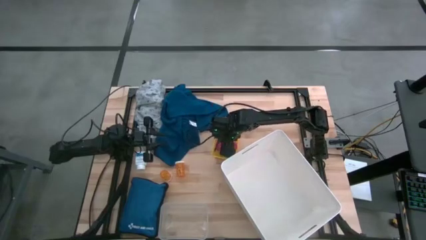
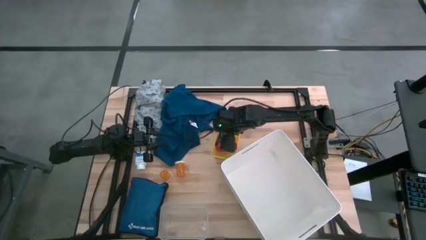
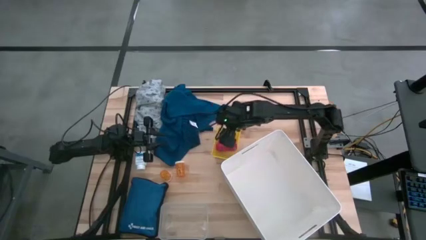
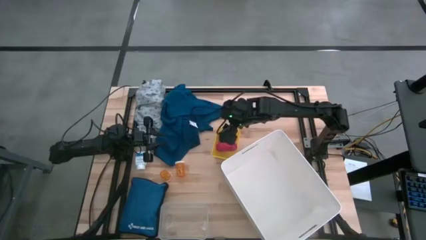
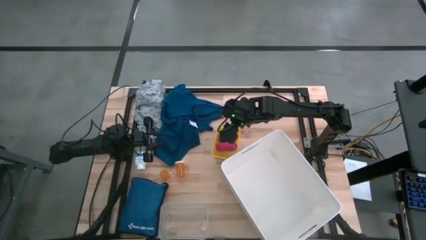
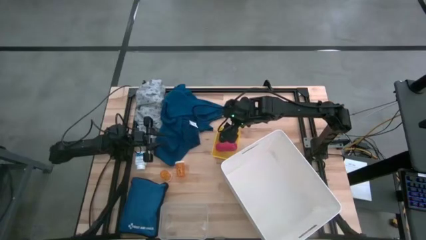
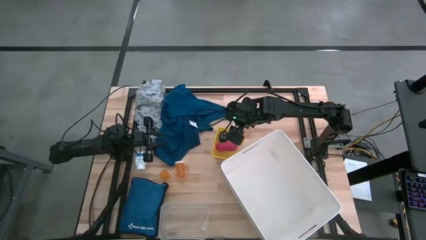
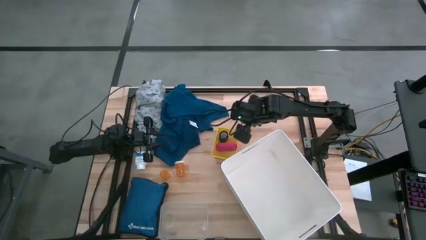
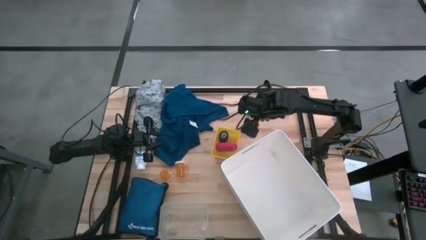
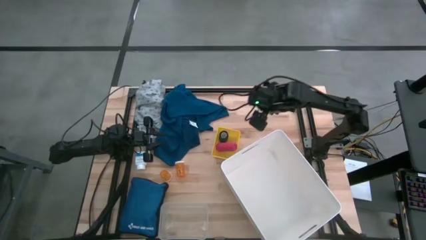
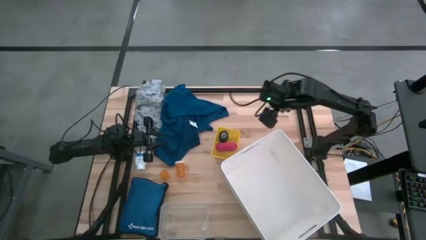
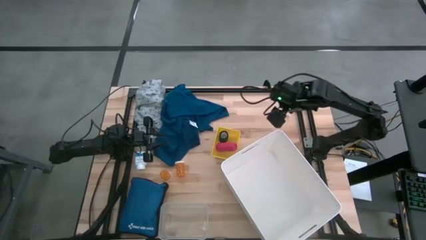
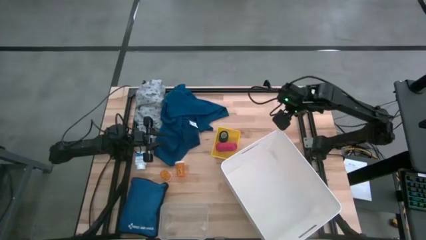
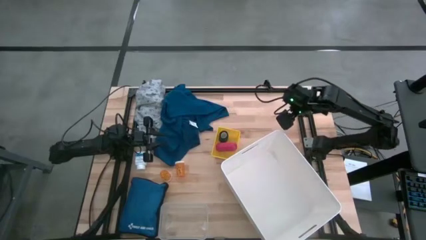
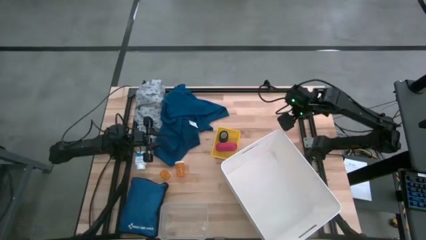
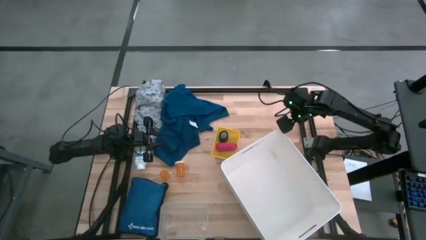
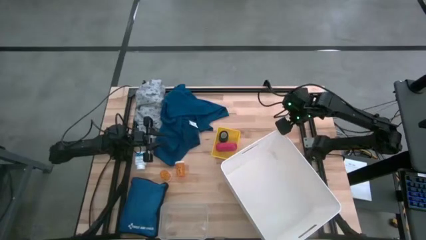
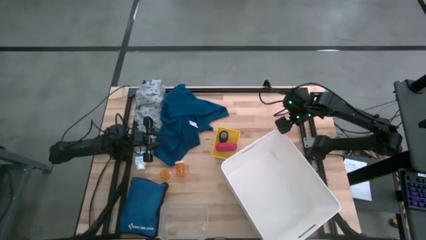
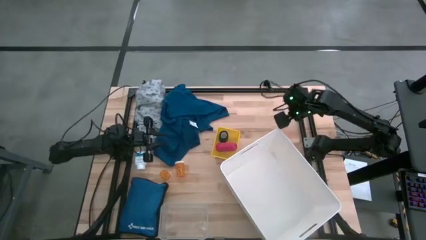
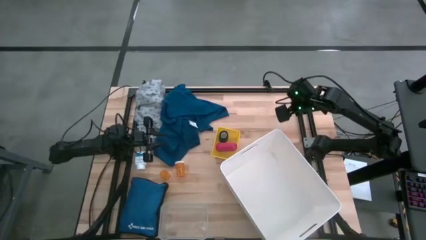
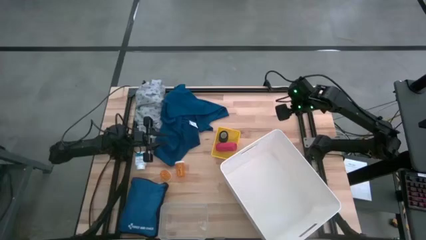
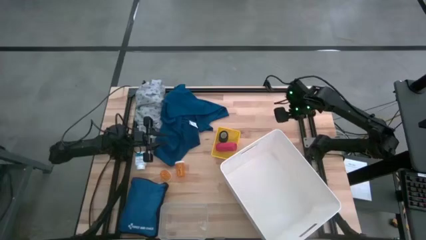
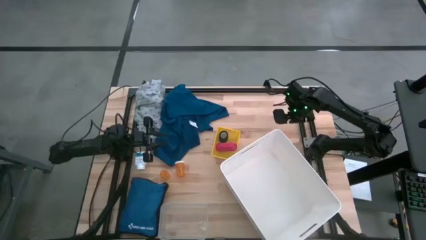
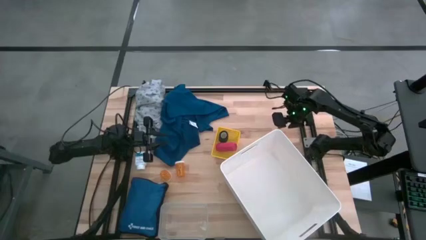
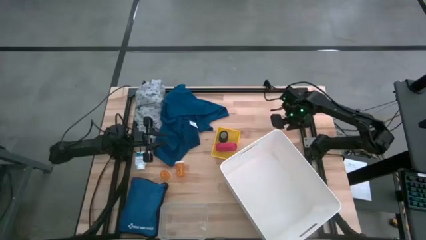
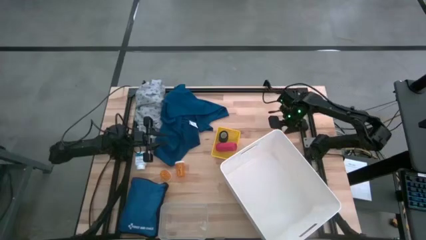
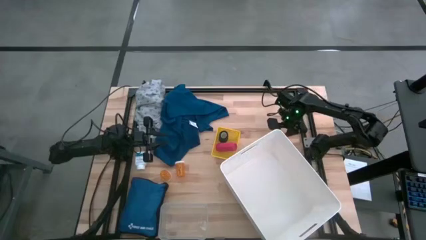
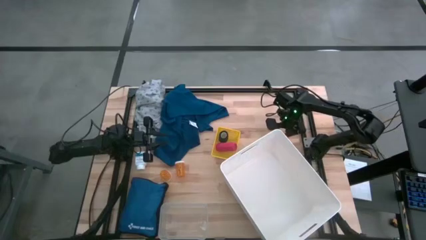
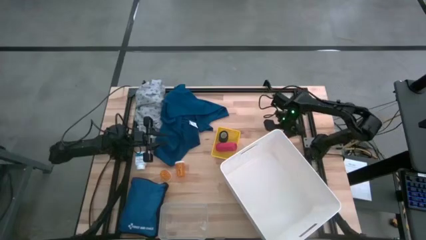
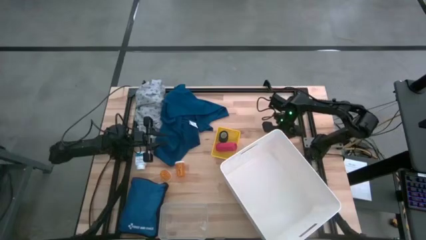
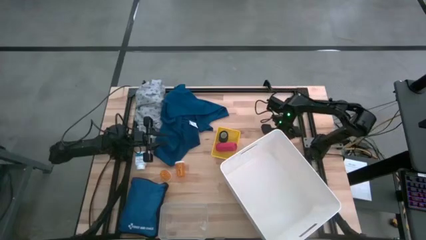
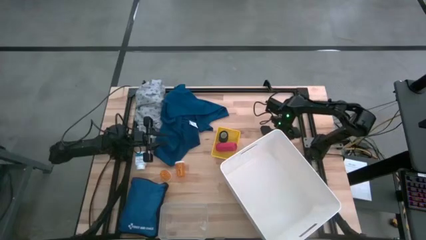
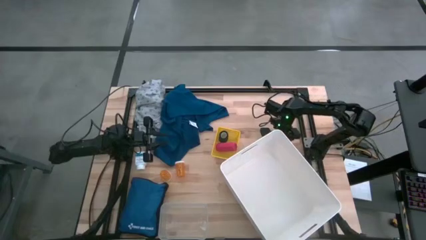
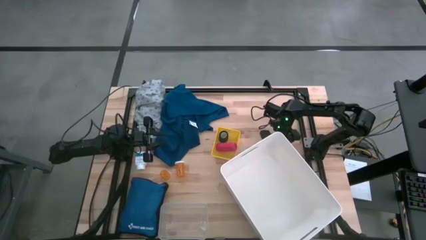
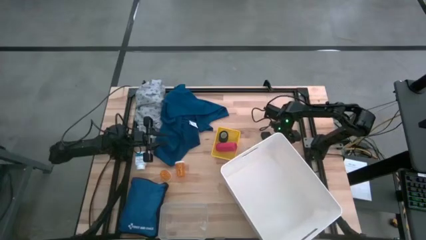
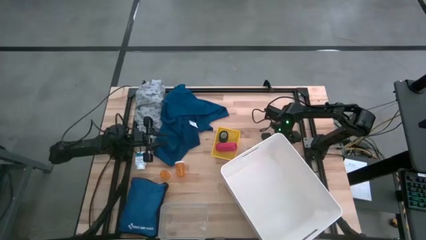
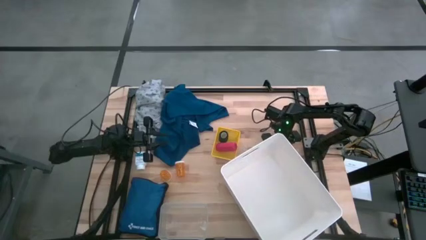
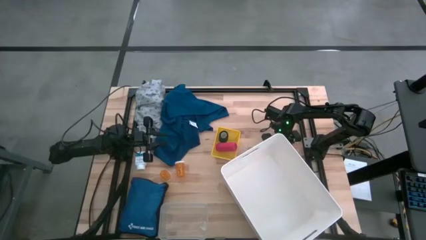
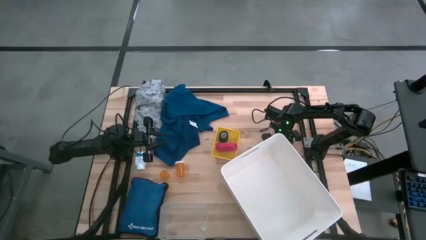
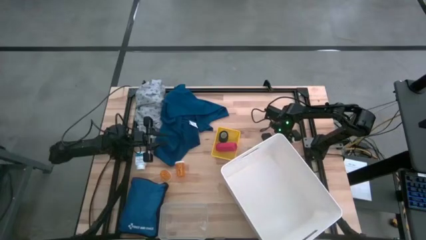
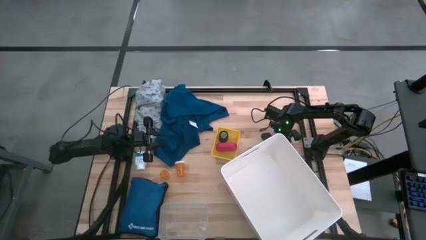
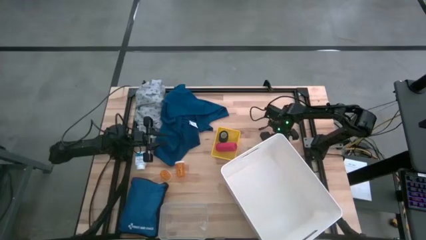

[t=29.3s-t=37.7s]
Task: Pick & place medical supplies in basket/bin
Put the light blue bandage into the yellow bin

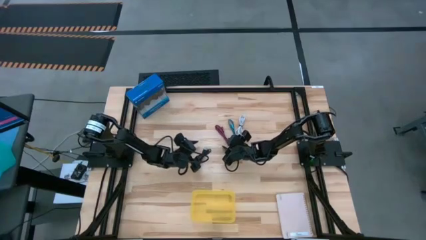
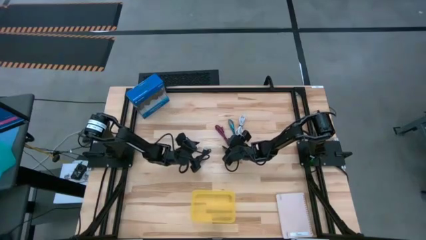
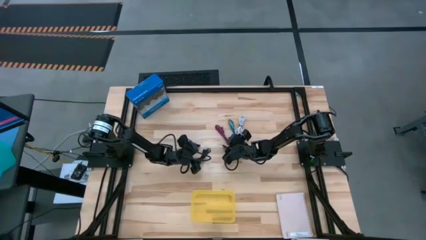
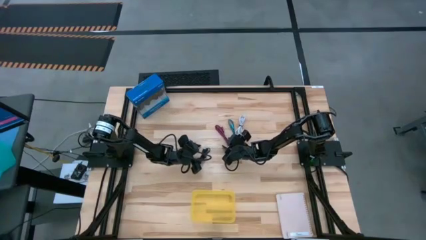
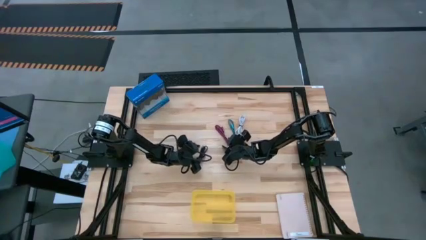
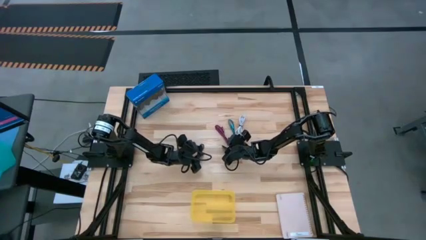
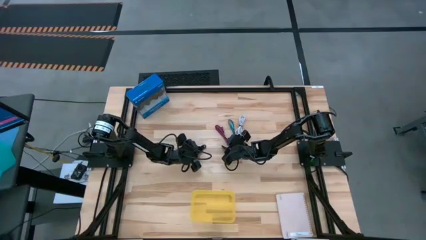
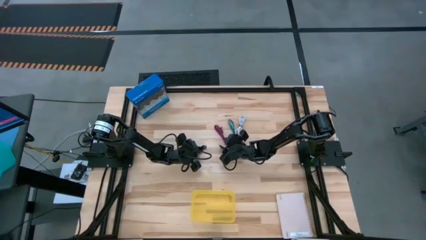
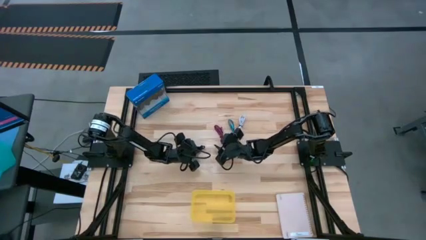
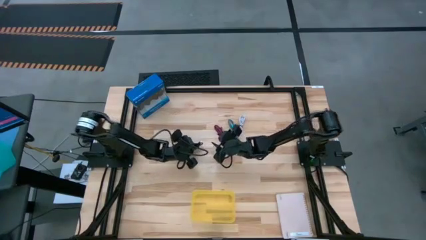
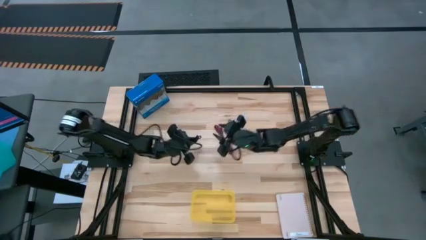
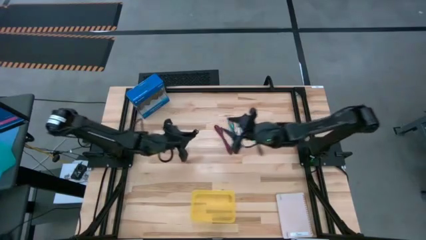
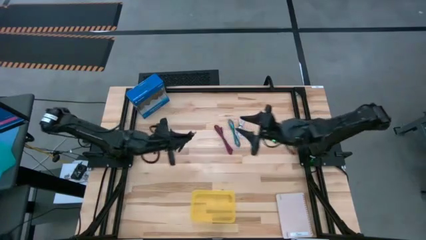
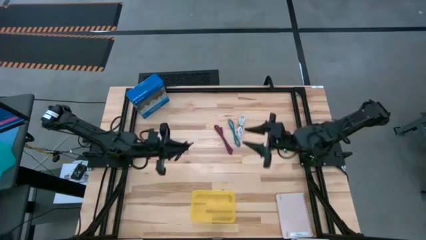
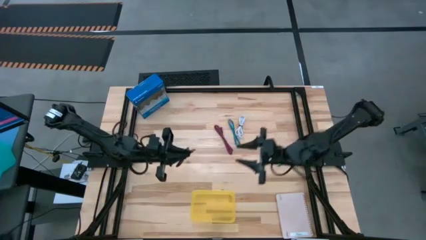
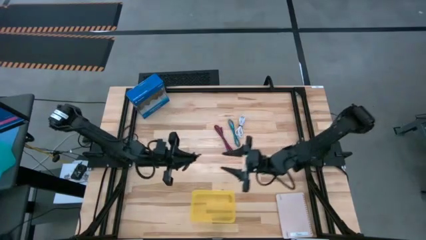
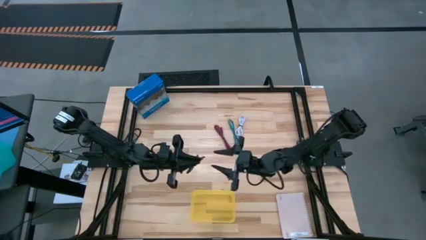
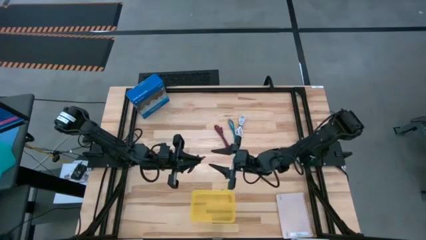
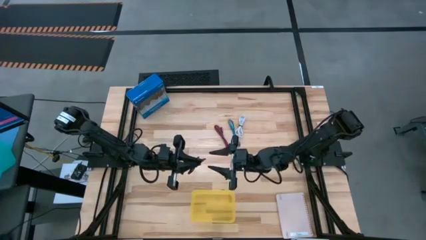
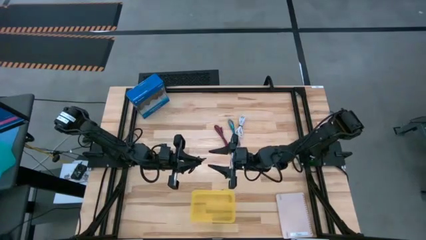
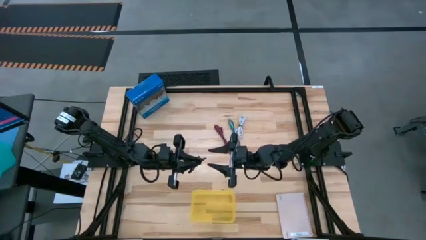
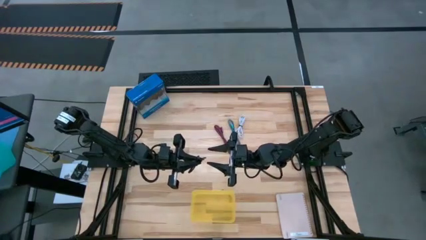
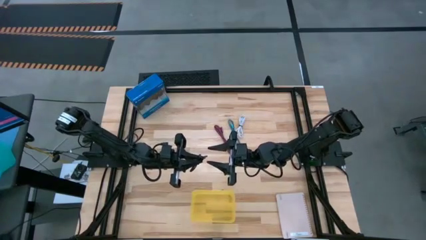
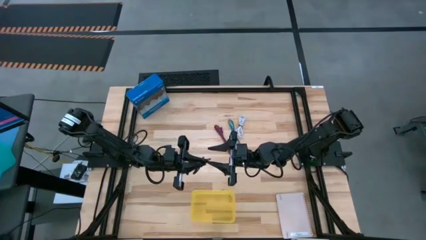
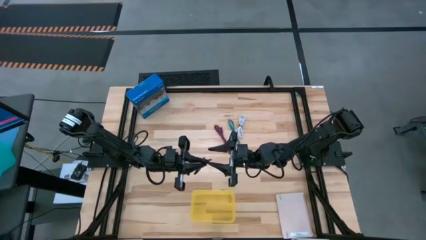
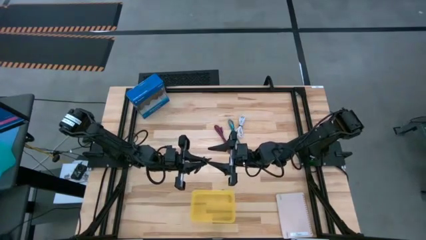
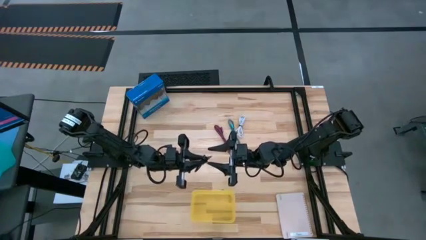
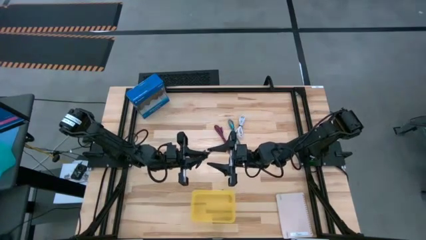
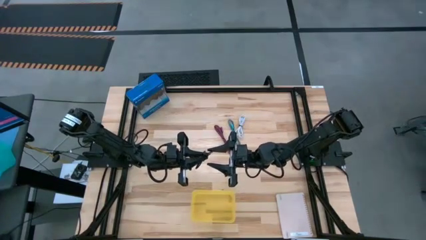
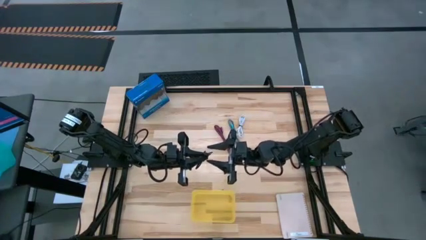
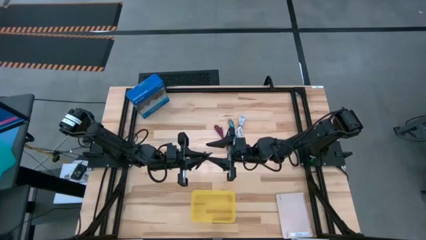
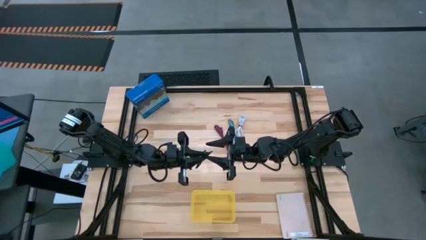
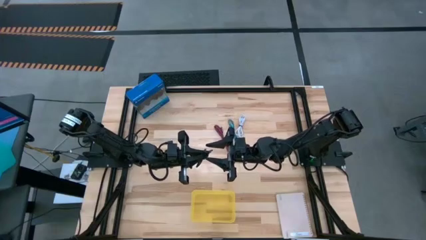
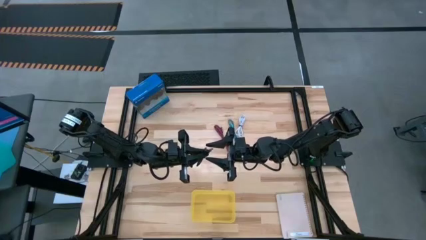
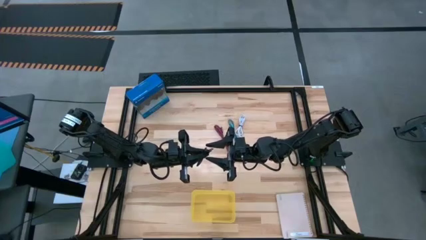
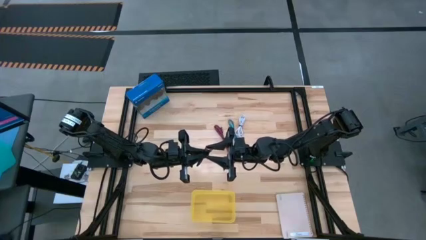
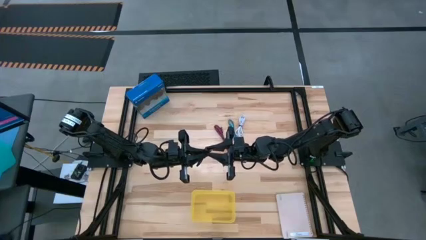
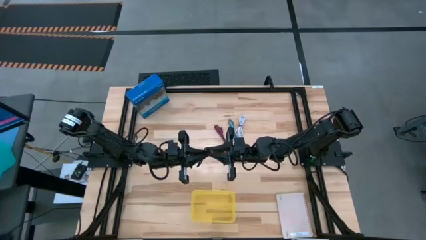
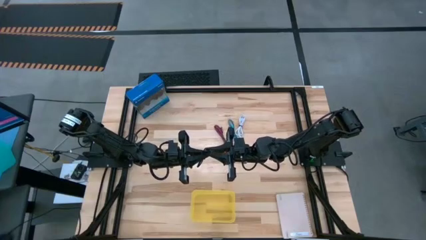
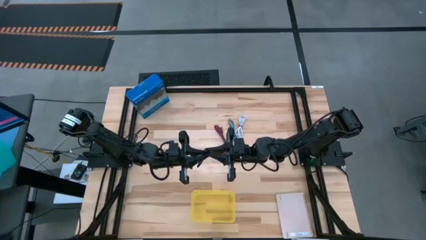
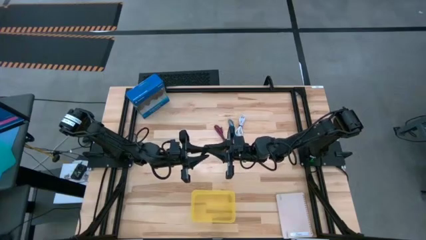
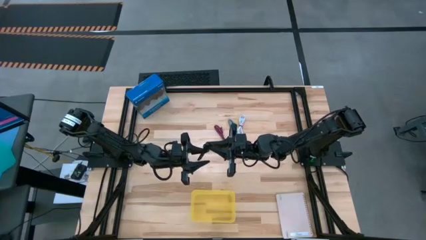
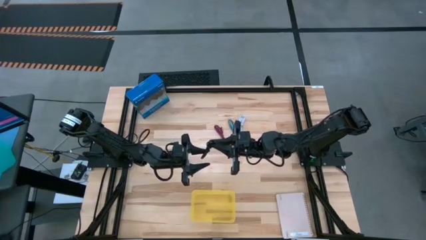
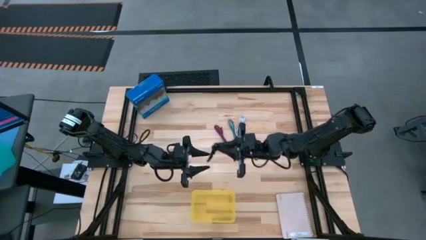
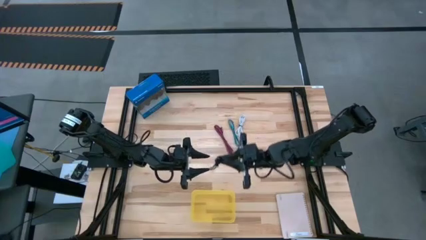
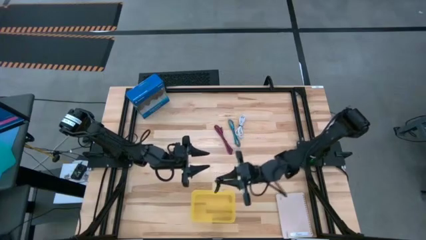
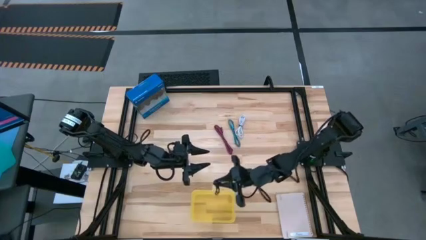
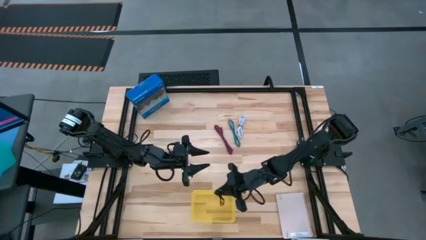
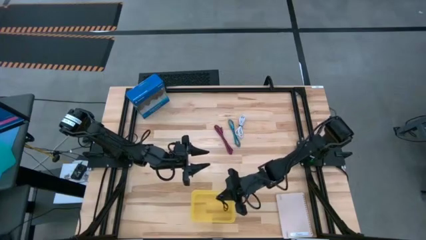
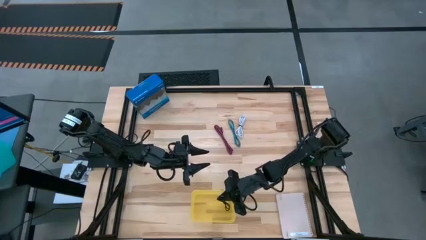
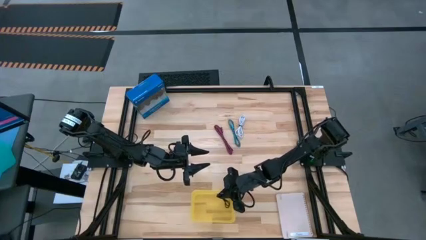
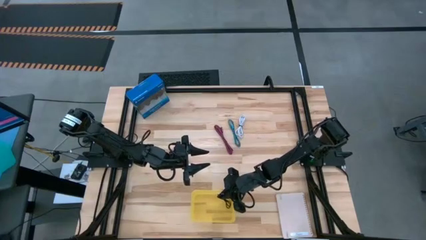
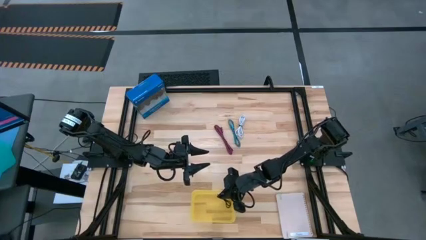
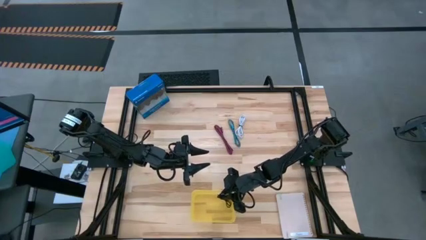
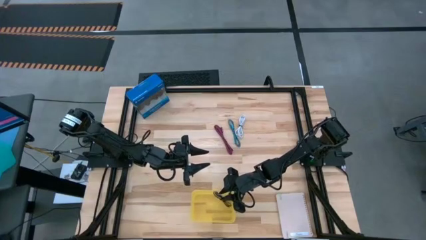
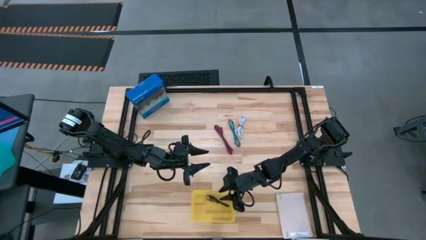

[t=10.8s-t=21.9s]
Task: Pick and place USB-C Cables
Put the black charger cable into the yellow bin
